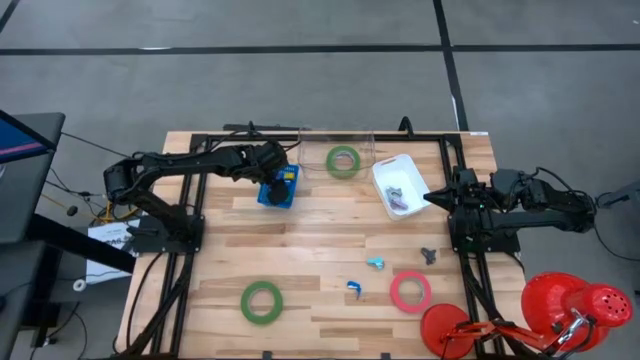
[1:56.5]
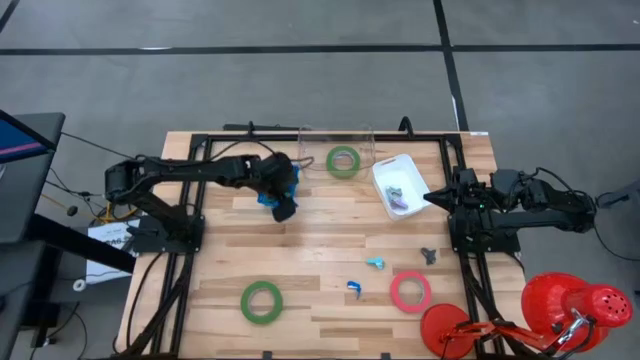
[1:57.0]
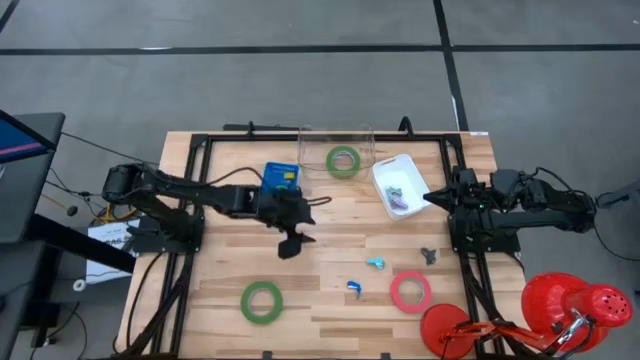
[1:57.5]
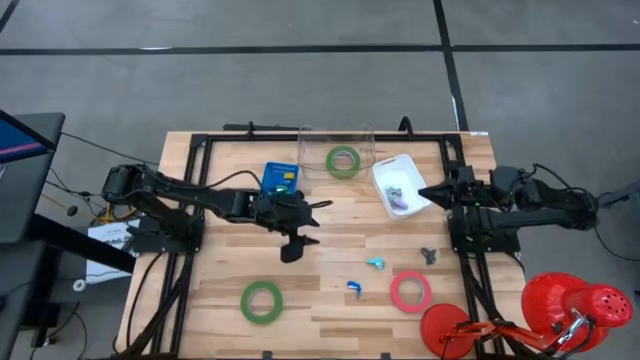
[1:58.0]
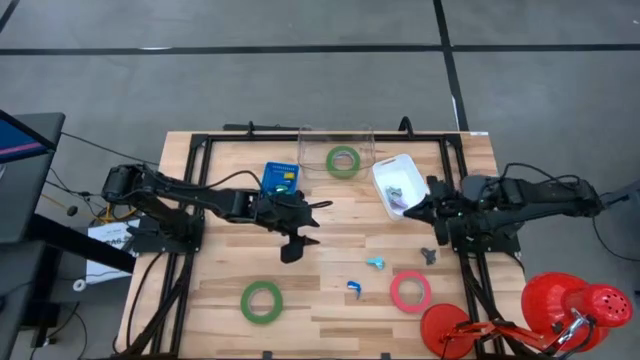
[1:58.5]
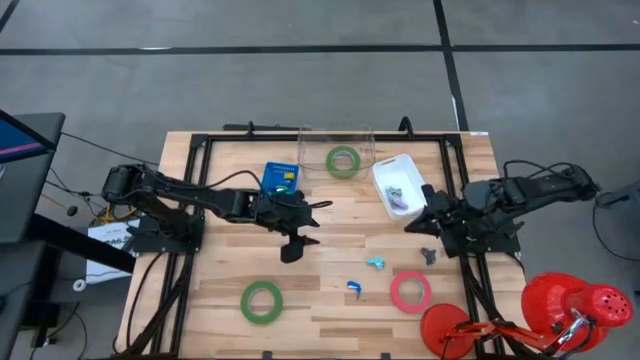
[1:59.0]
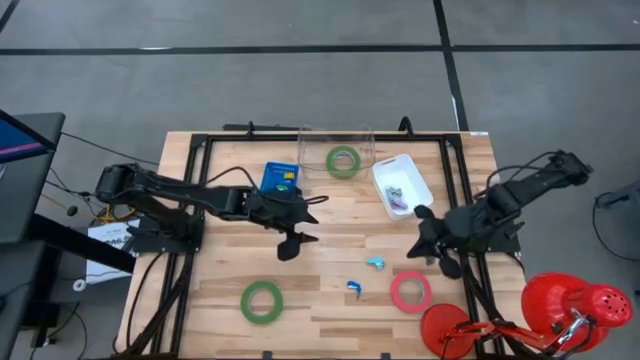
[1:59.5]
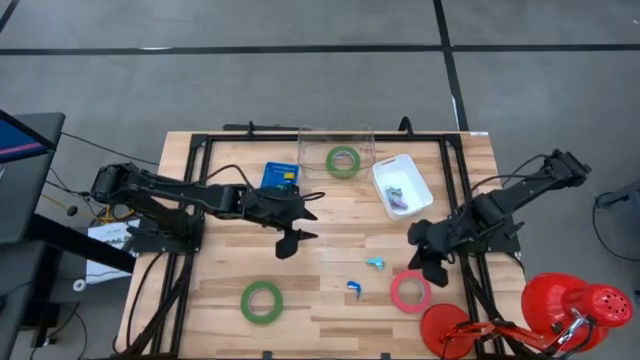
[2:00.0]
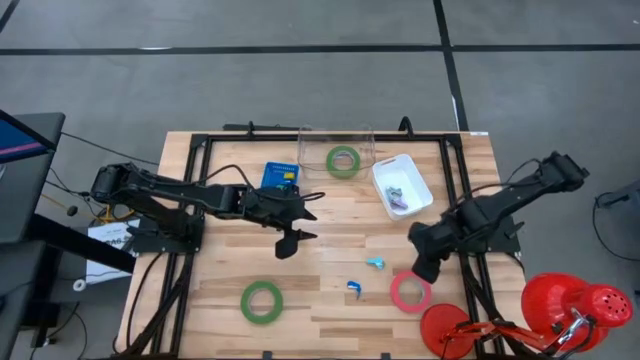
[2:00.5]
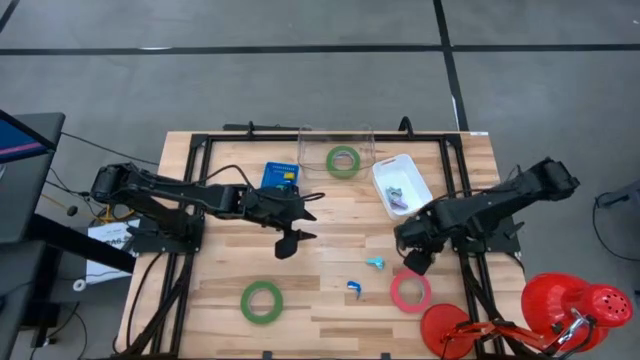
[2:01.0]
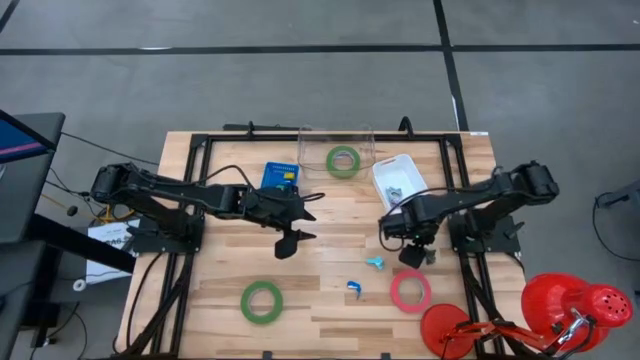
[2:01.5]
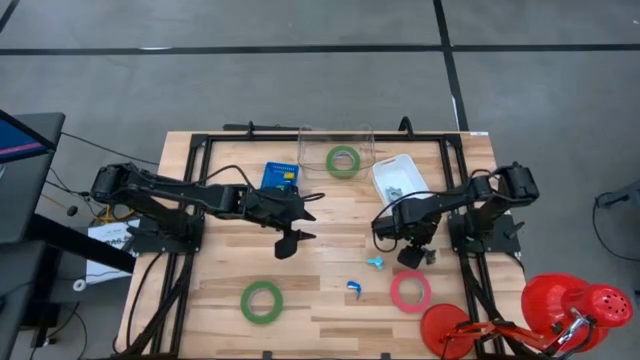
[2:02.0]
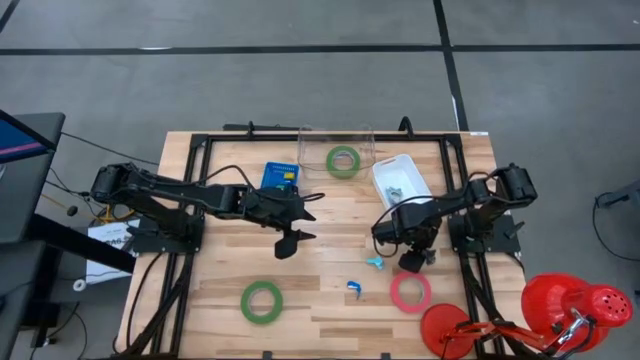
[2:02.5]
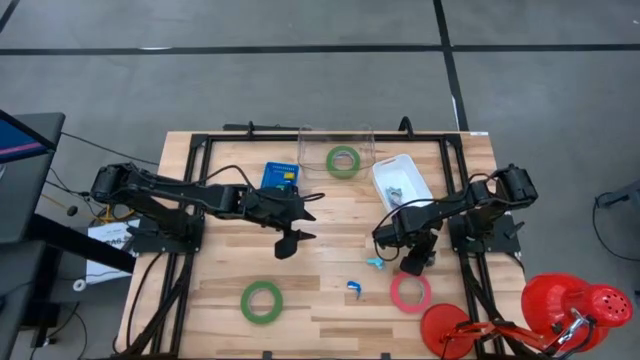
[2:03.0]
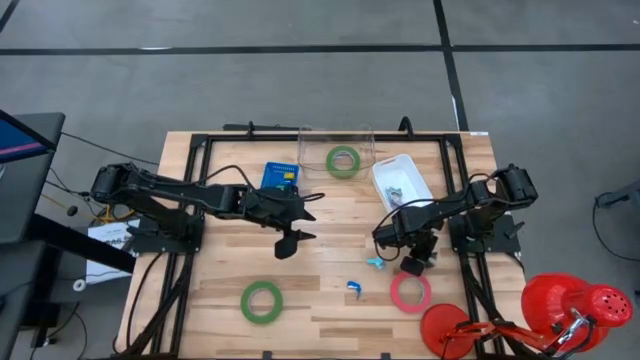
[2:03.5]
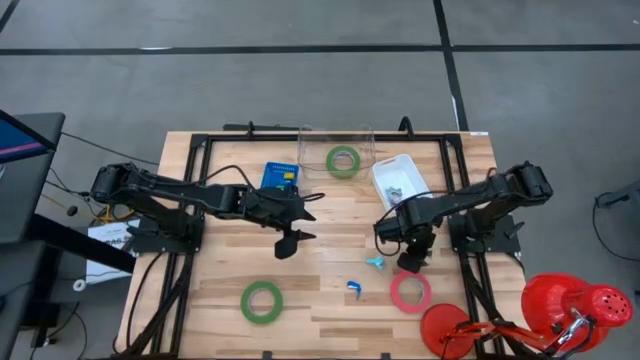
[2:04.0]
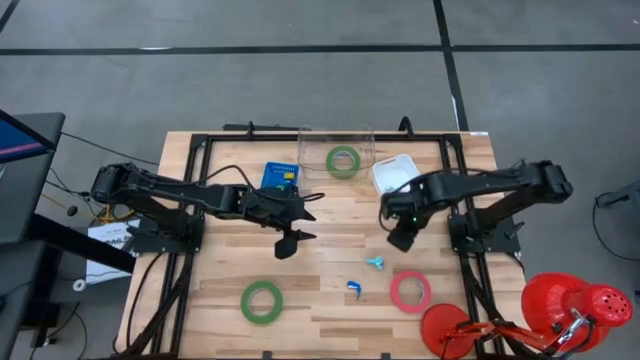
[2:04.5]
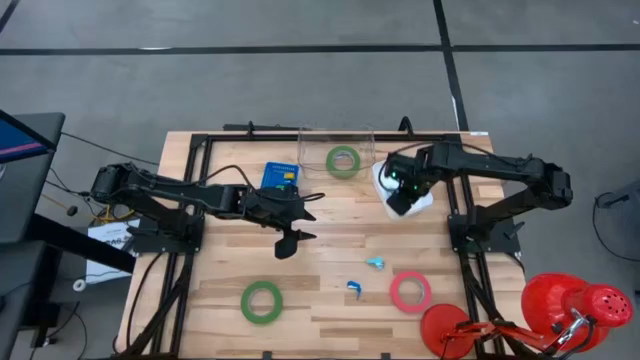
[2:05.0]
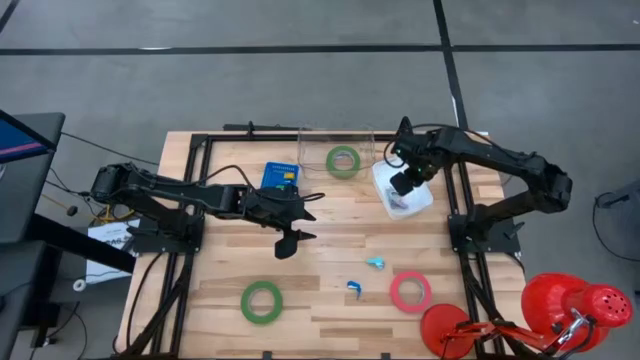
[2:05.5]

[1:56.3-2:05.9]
Task: Pick and place Stapler, Stapler remover, tape
Put the black staple remover into the white bin

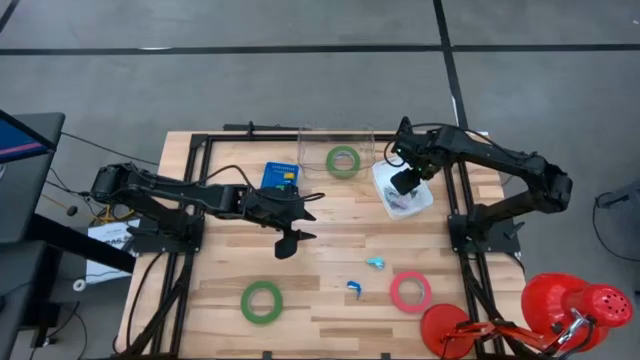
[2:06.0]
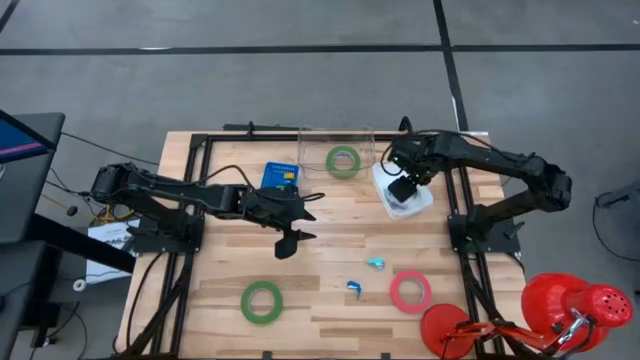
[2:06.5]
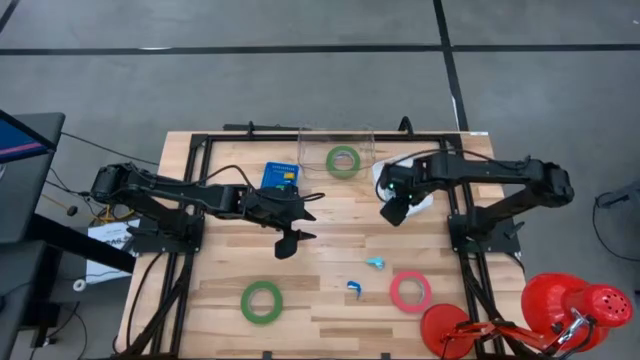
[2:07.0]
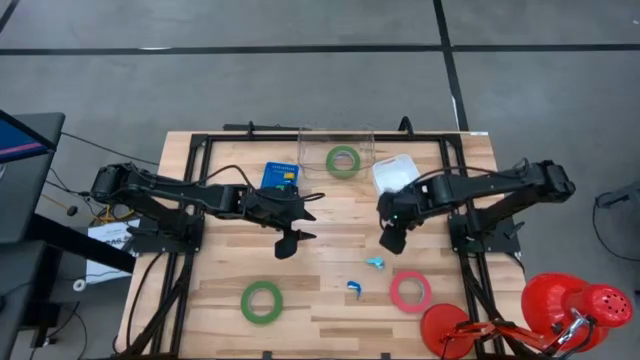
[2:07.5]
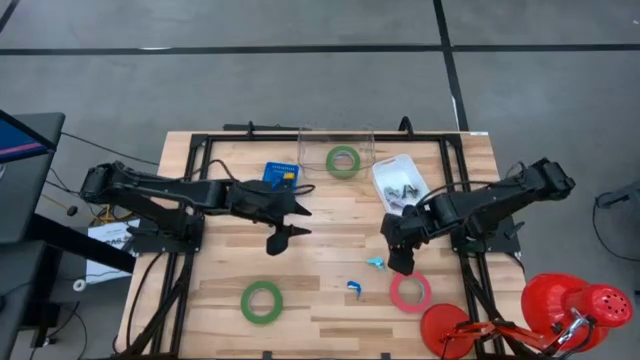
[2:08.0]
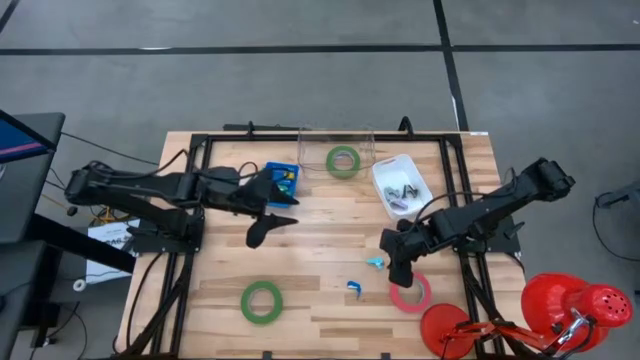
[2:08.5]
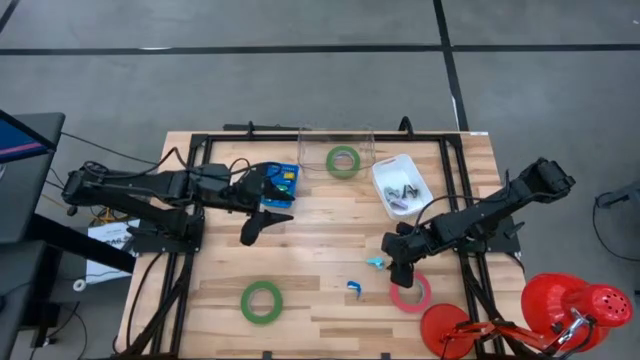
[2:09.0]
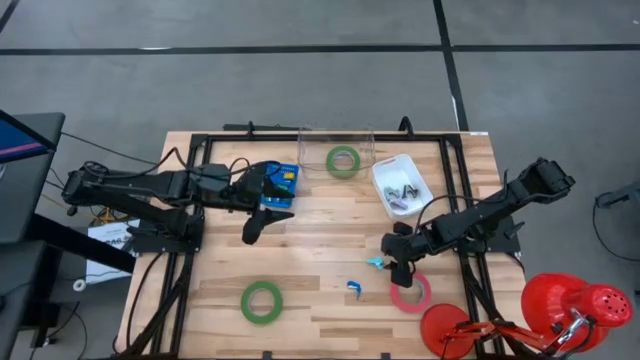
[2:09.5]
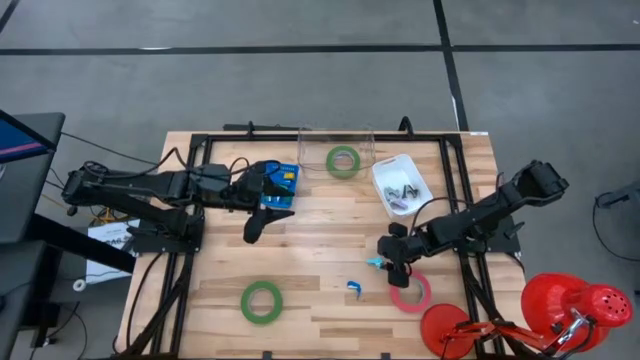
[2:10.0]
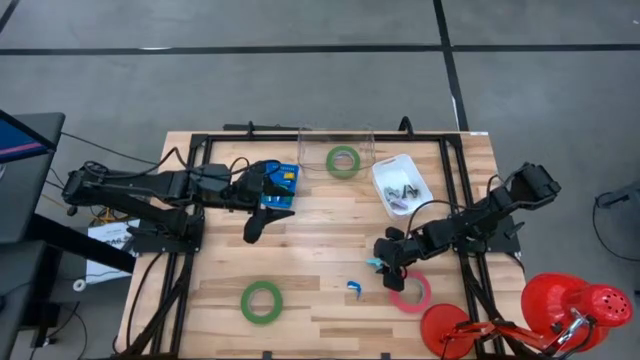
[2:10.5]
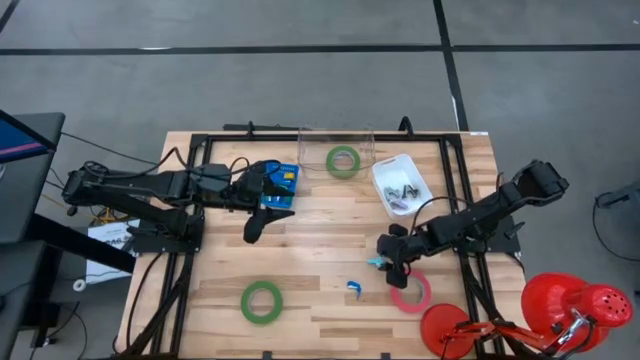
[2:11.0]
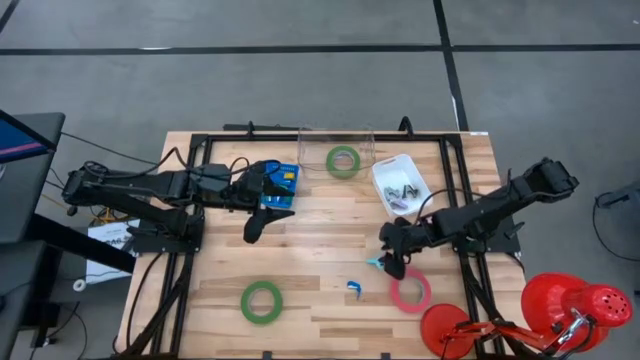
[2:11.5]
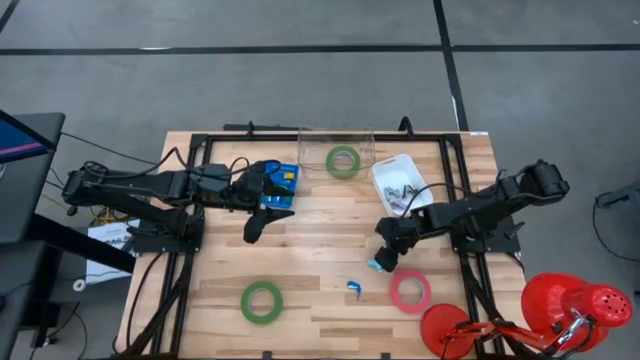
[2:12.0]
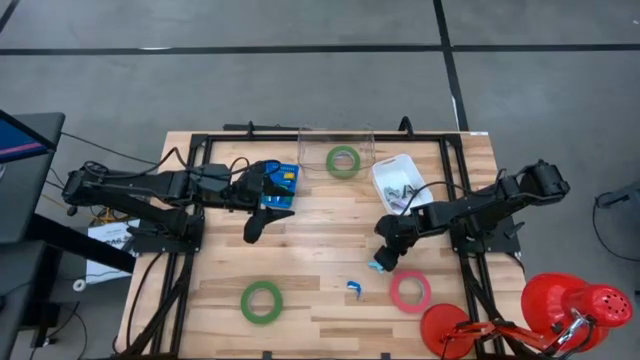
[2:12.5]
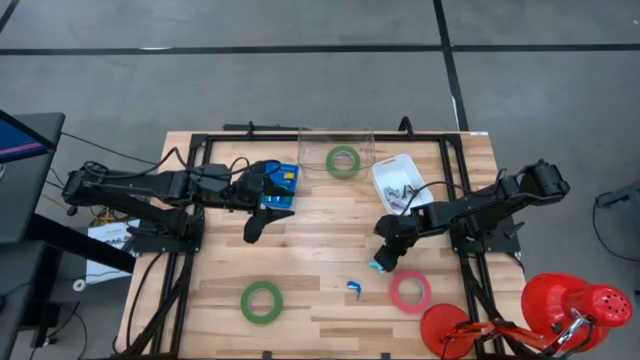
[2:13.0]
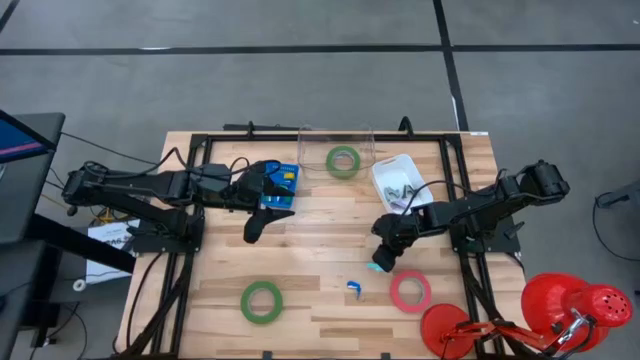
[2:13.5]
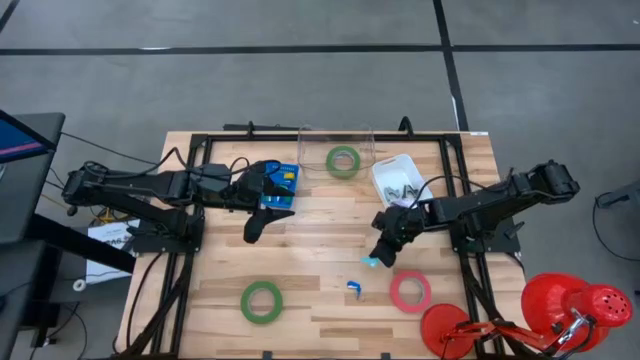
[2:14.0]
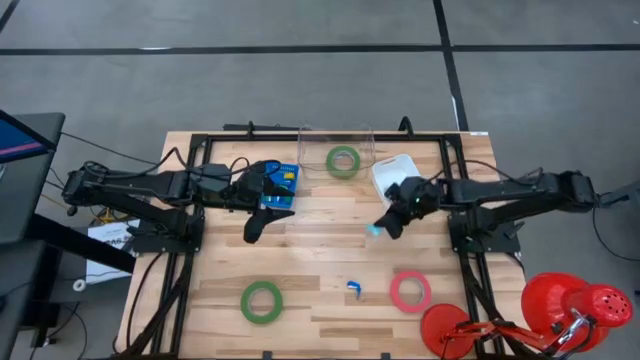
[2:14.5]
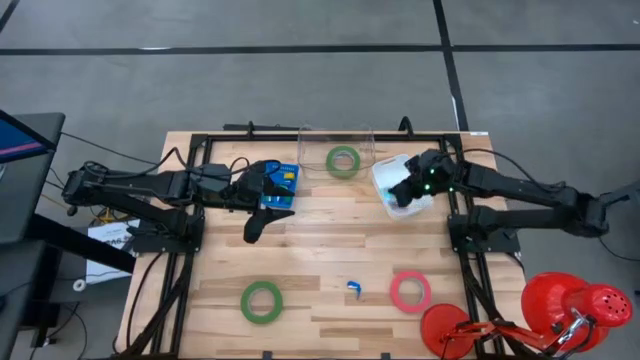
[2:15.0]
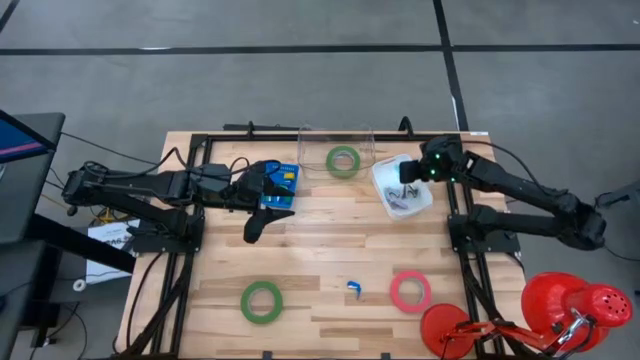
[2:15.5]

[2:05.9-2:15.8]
Put the light blue staple remover into the white bin

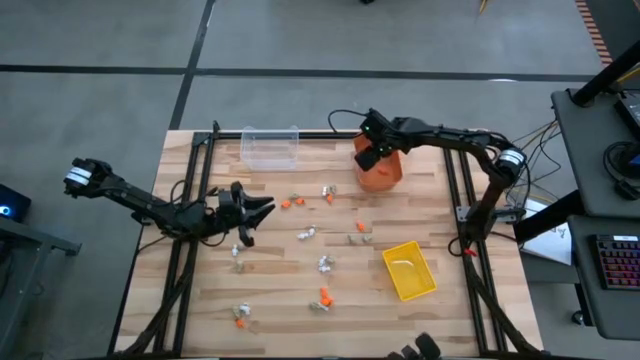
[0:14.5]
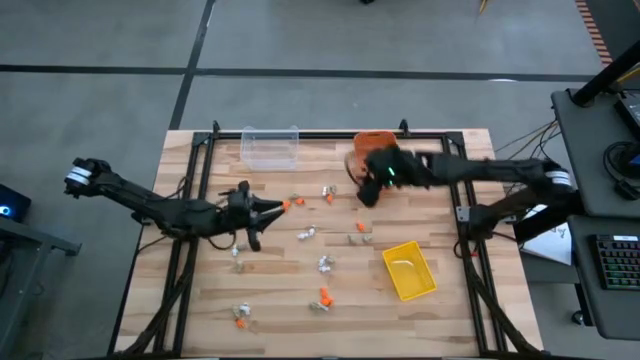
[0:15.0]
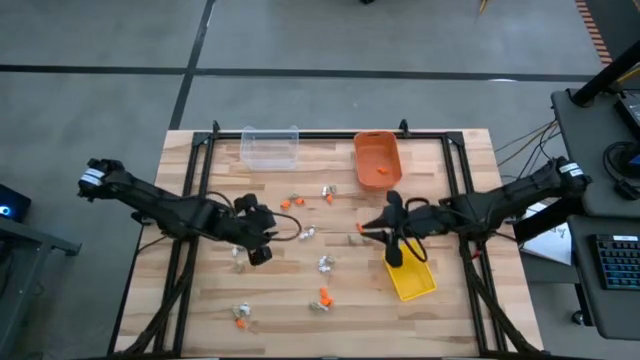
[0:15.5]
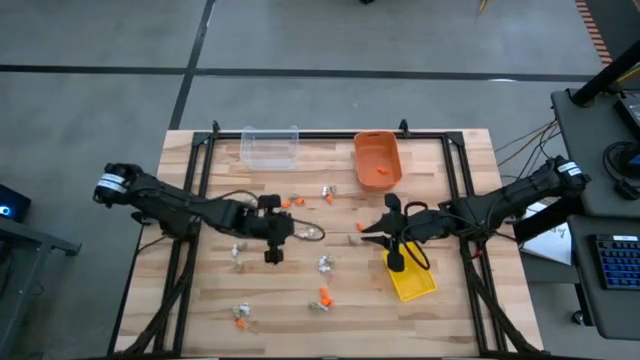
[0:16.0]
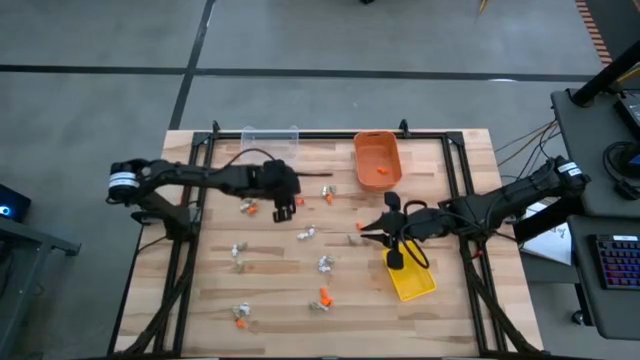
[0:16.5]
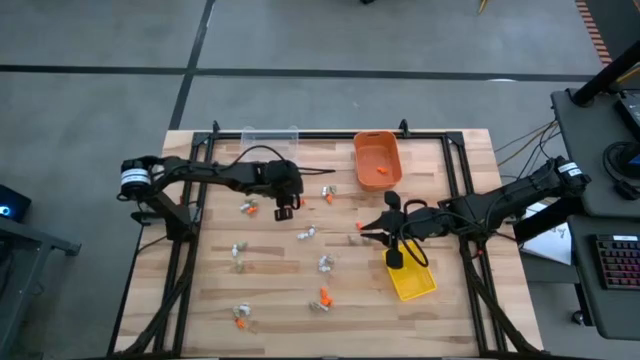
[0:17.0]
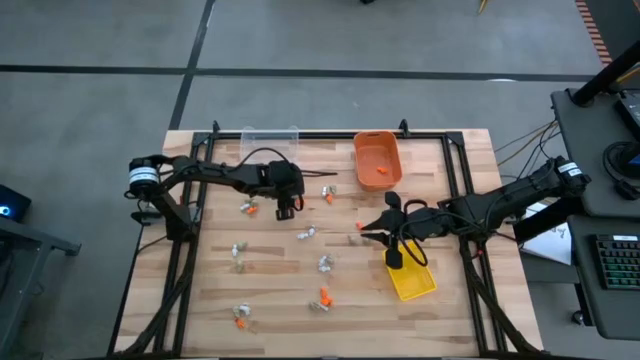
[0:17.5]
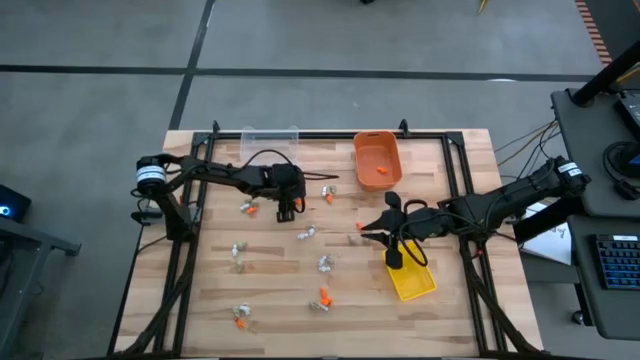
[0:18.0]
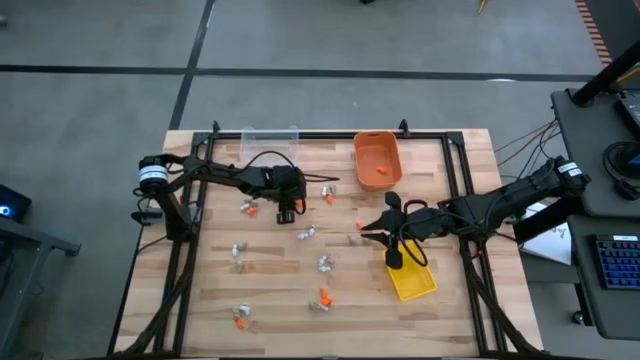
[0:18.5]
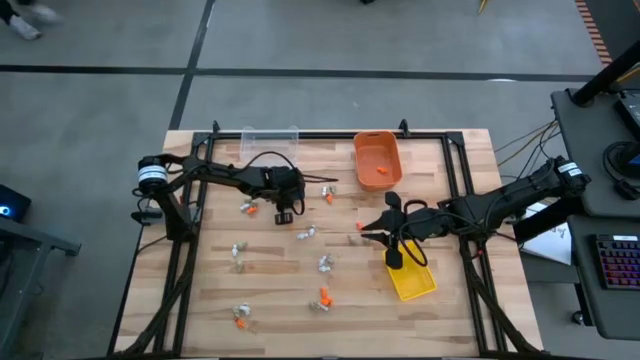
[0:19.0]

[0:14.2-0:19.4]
Task: Sort Halloween decoration
Put the gray skull toy into the yellow bin
